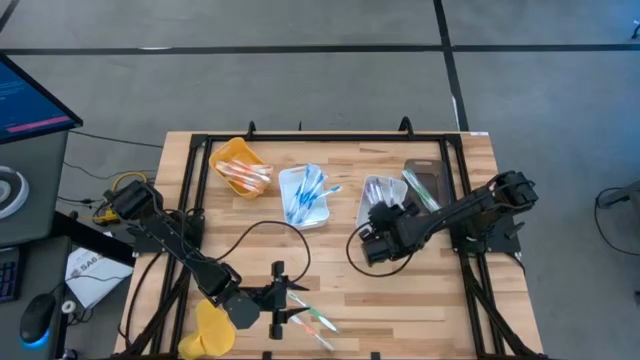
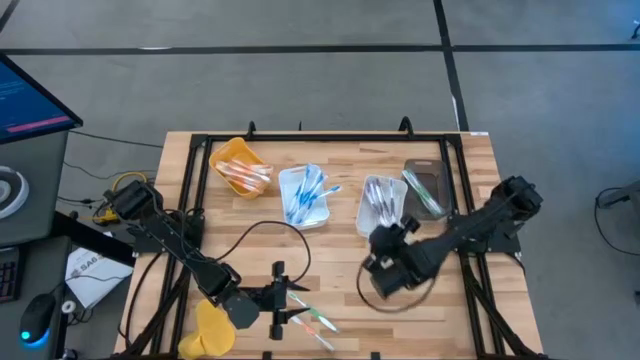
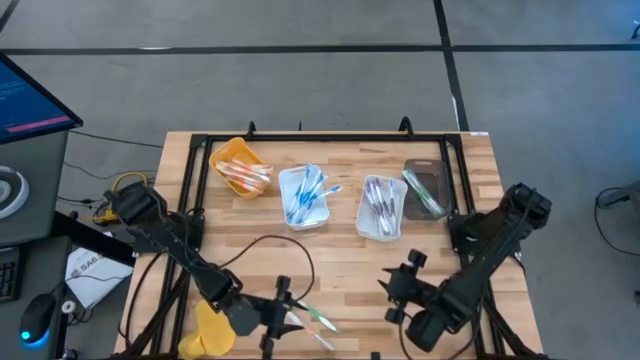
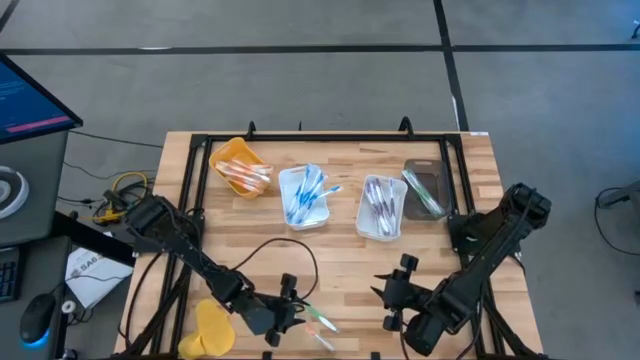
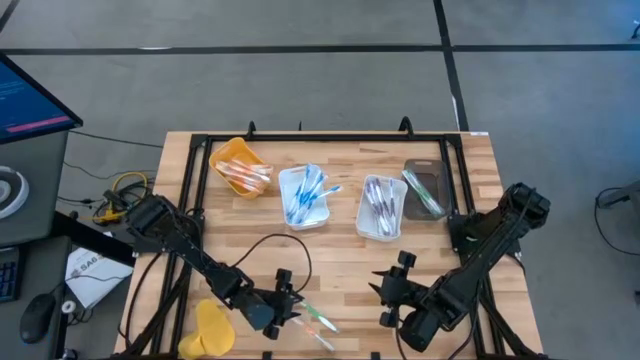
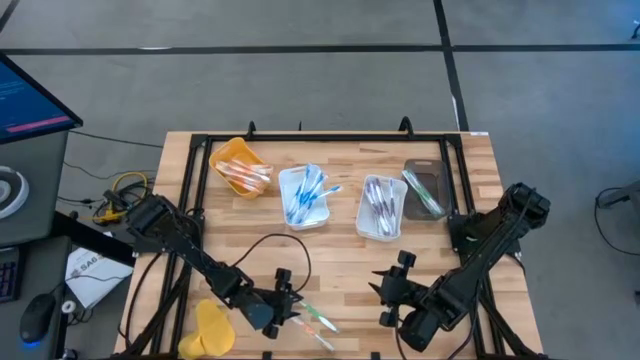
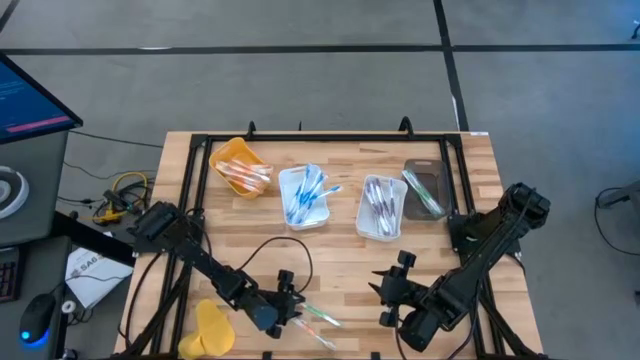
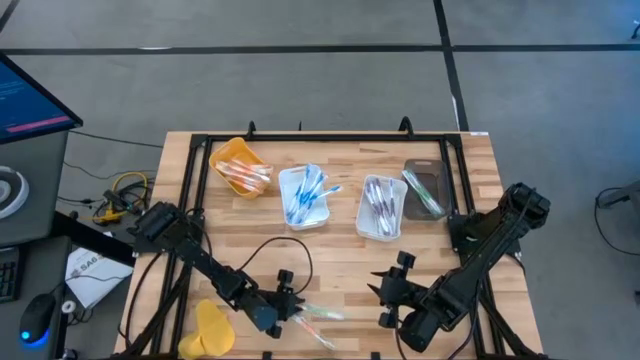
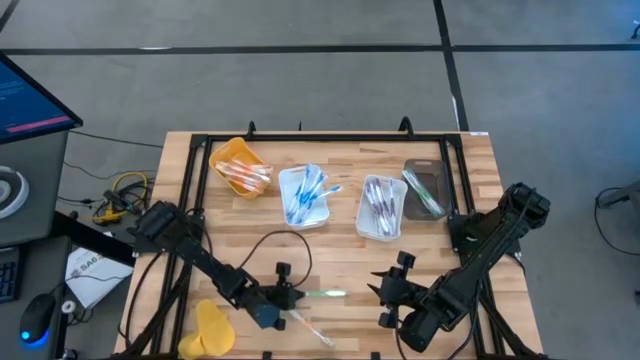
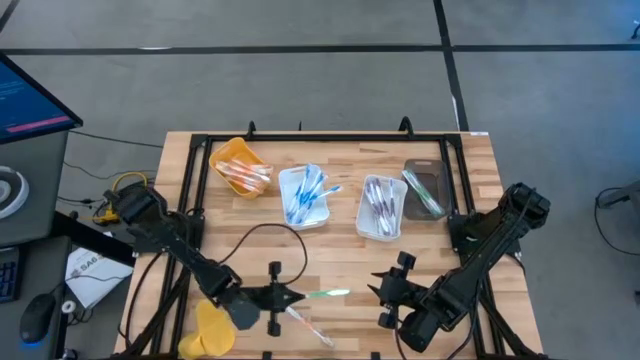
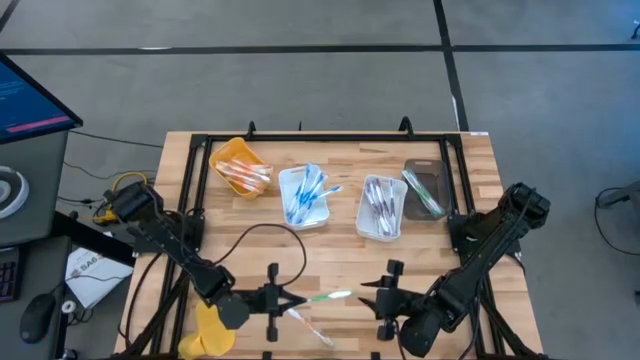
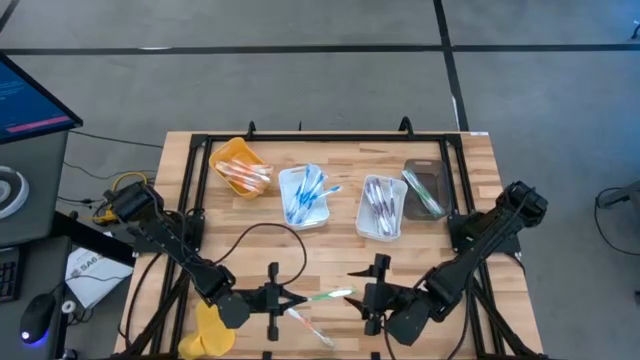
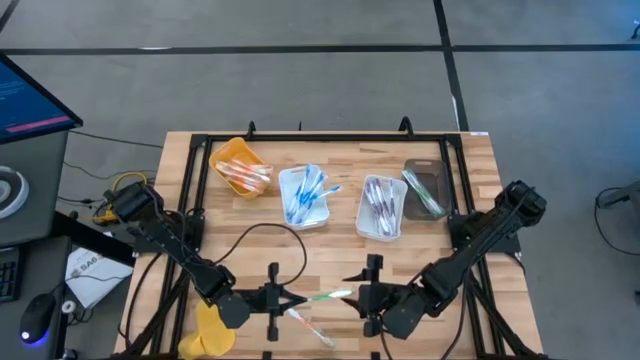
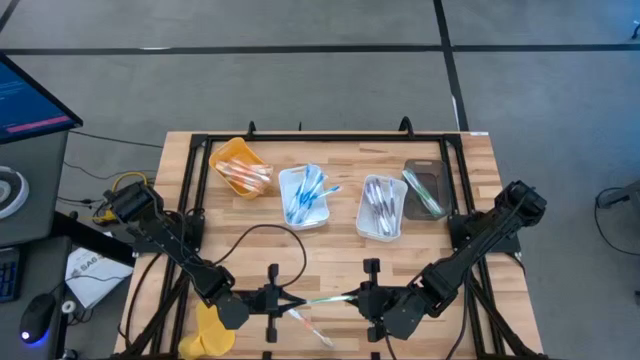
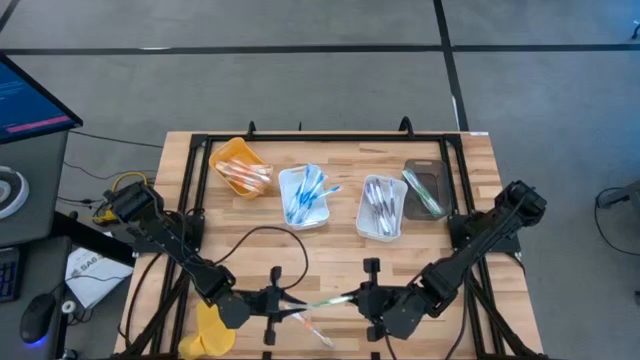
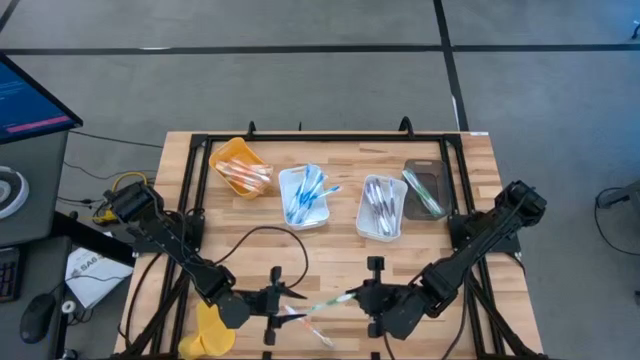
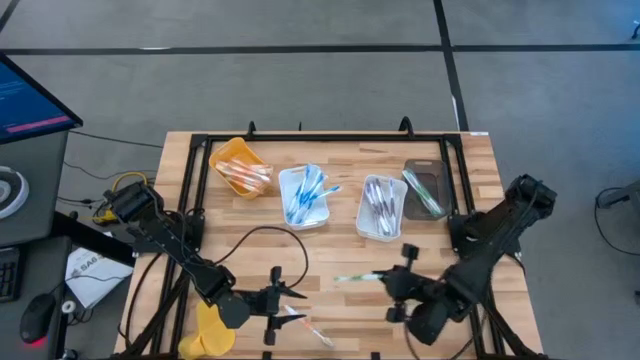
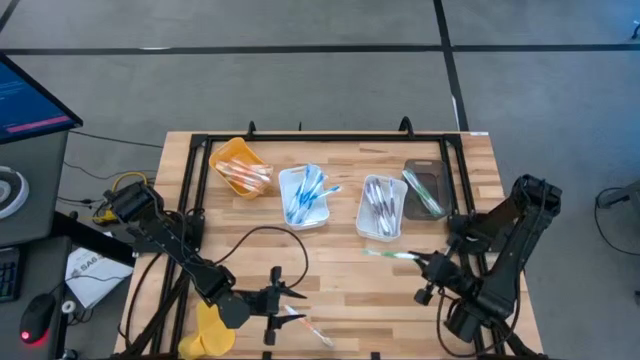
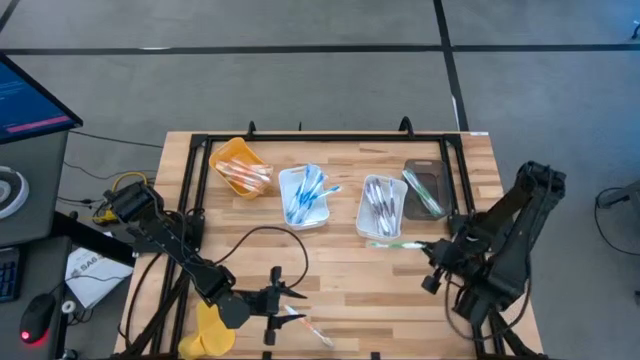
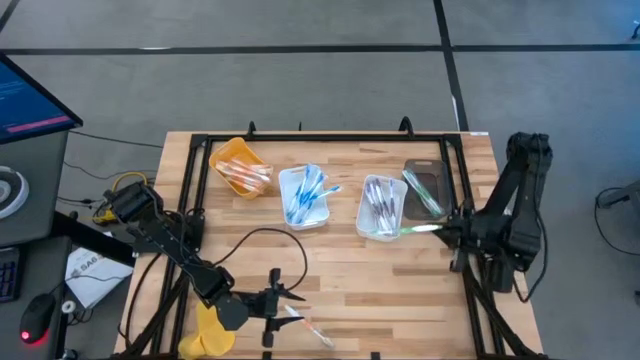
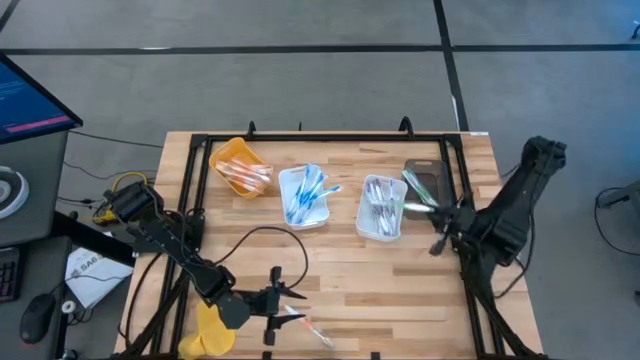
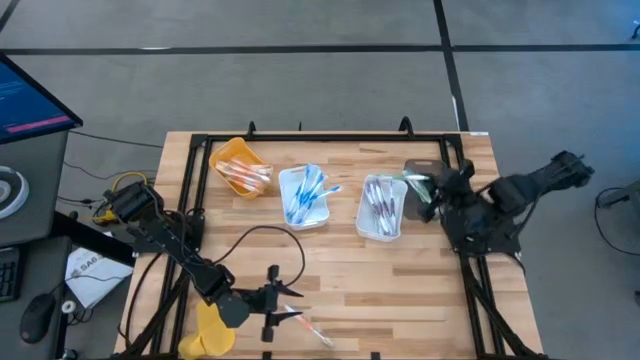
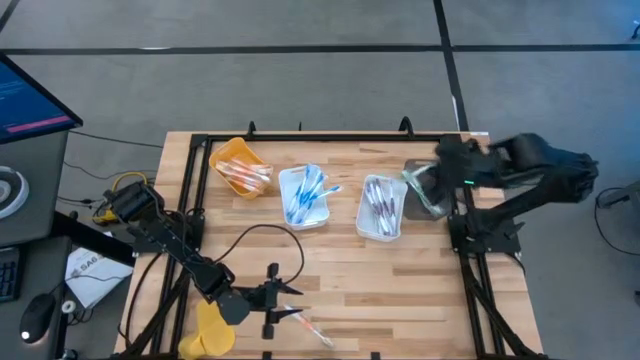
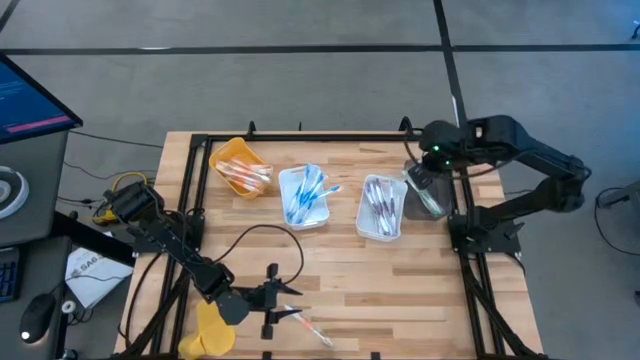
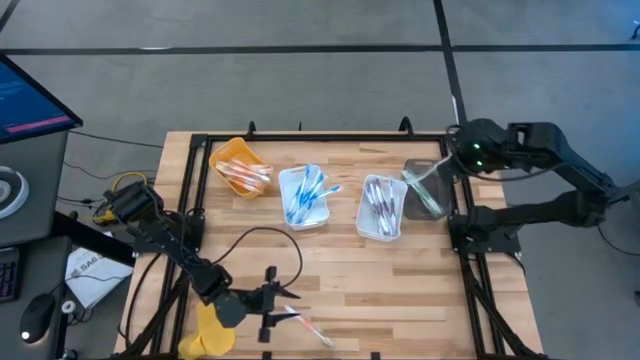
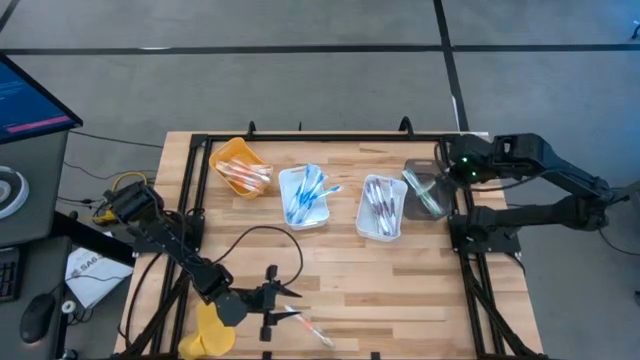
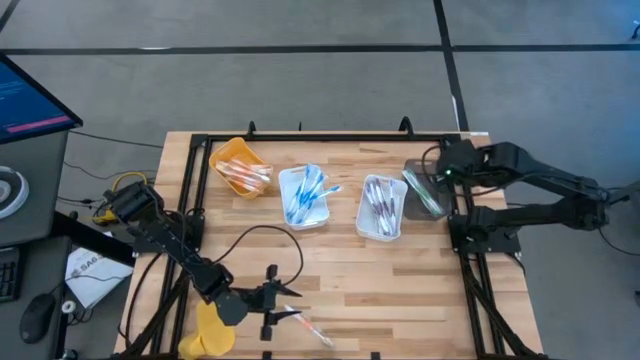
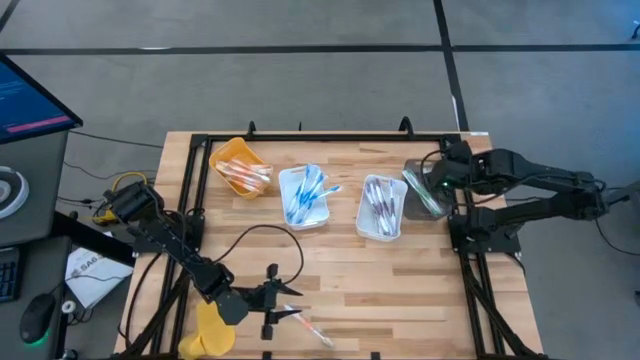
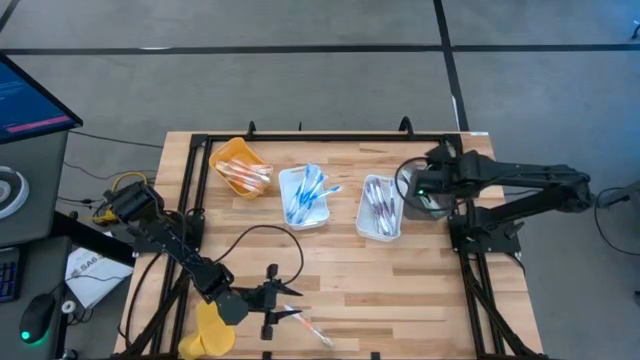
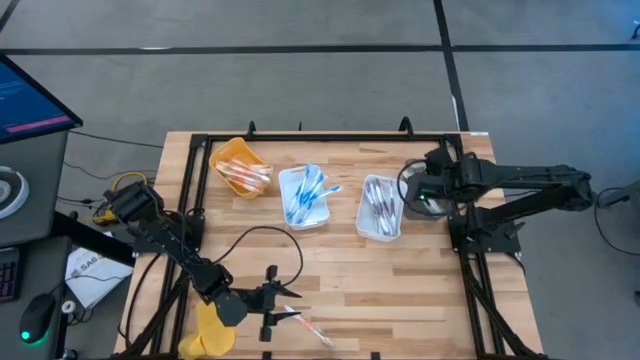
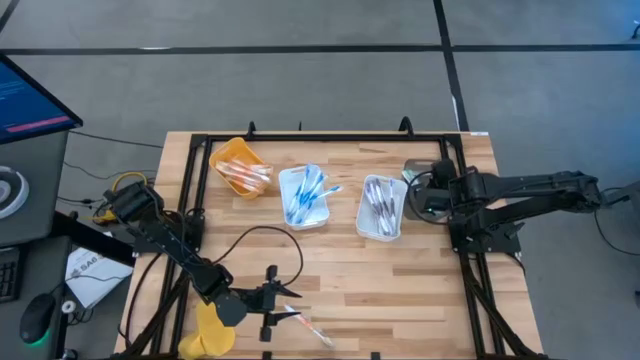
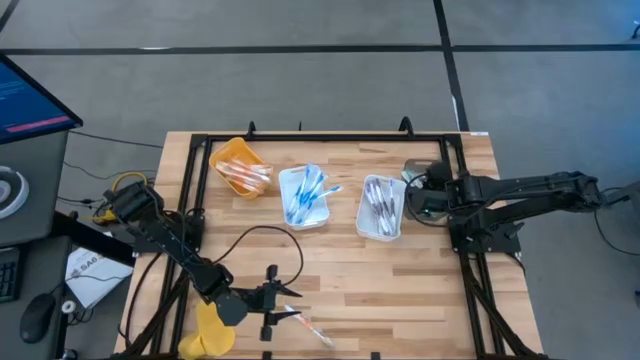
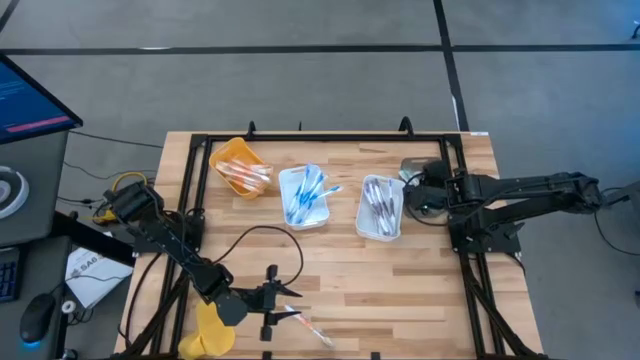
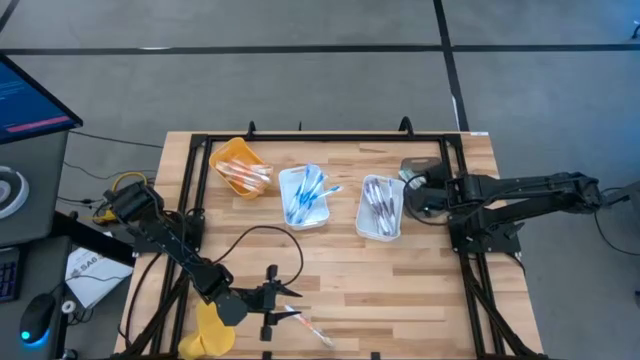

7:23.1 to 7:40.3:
Task: Pick & Place Toothbrushes
Put the green toothbrush into the black bin

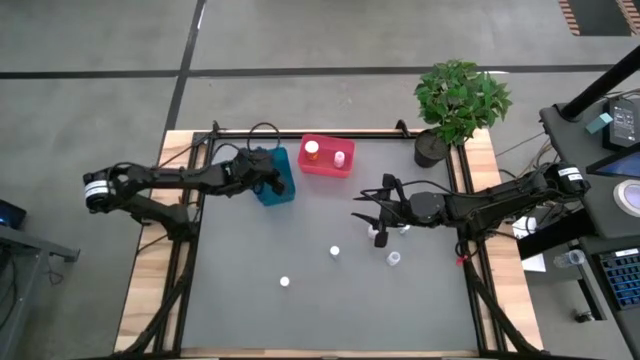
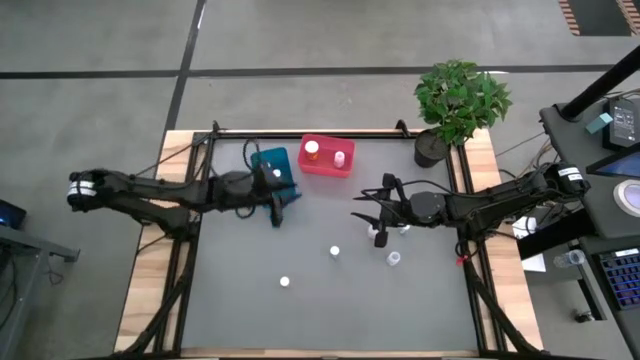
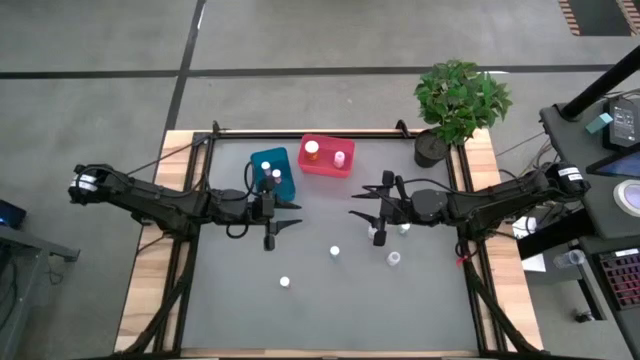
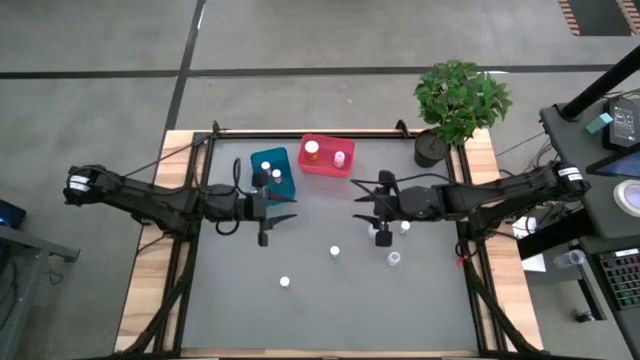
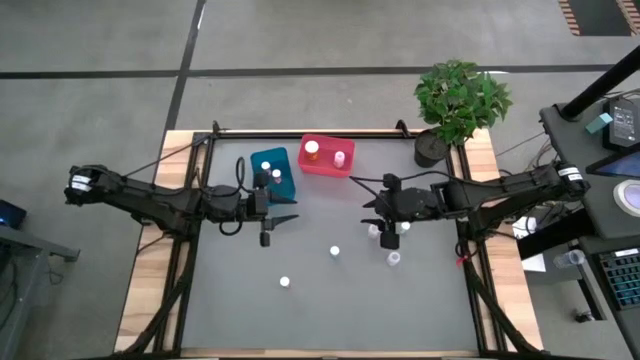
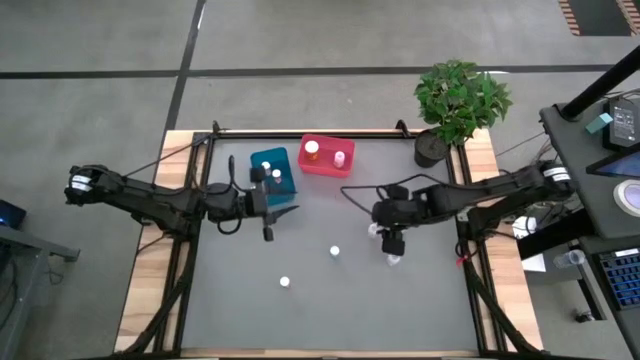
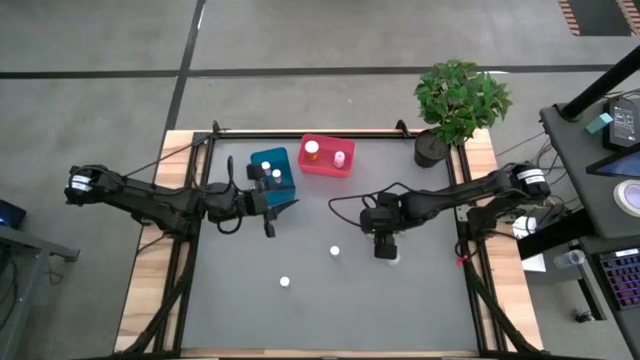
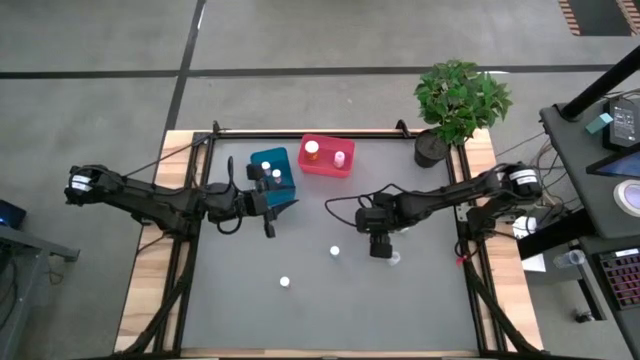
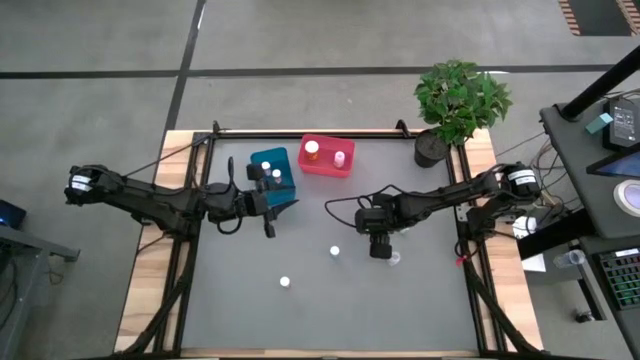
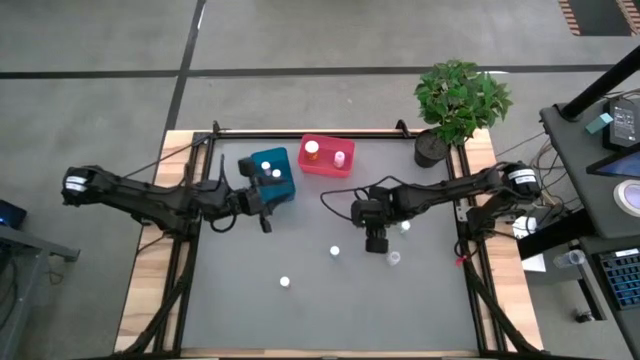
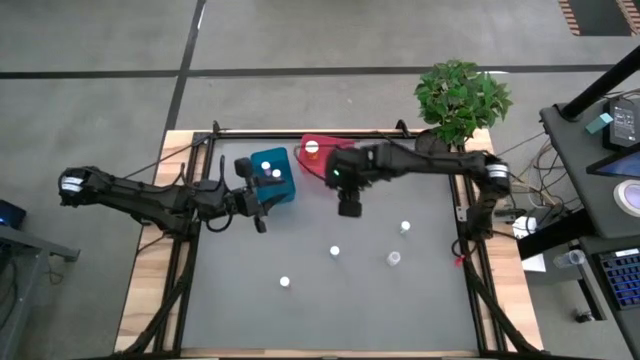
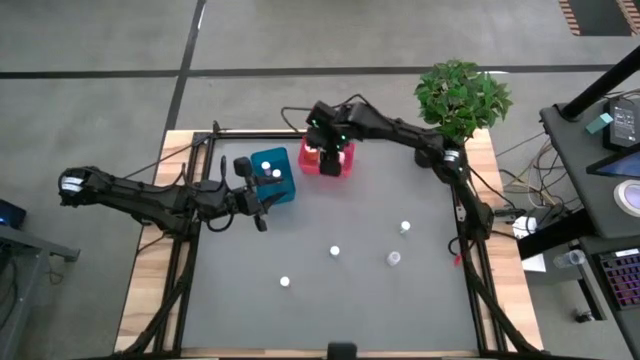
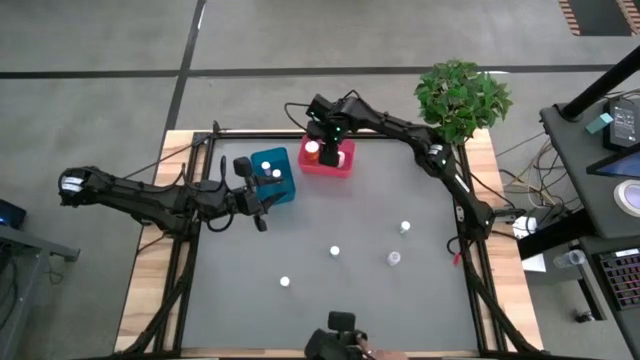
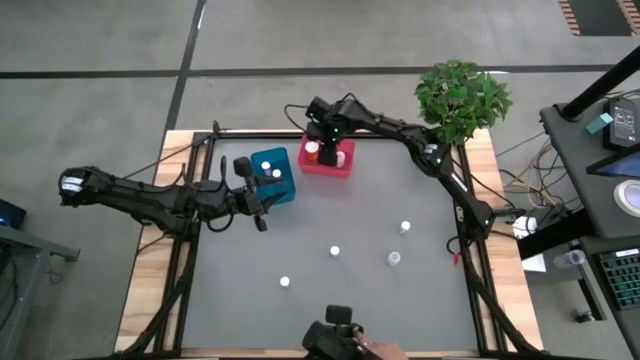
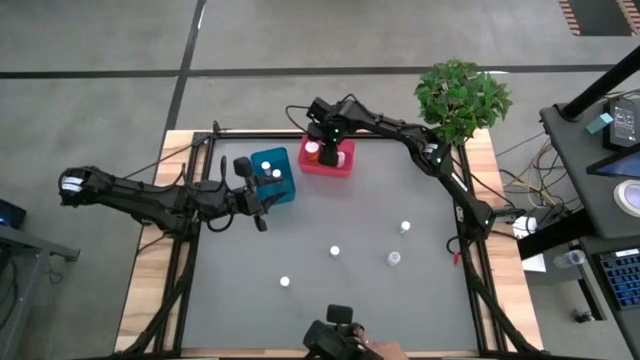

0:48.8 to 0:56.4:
Task: Pick and place medicine bottles into bin by pill shape (circle, oval)
Put the top white capsule bottle into the red bin
